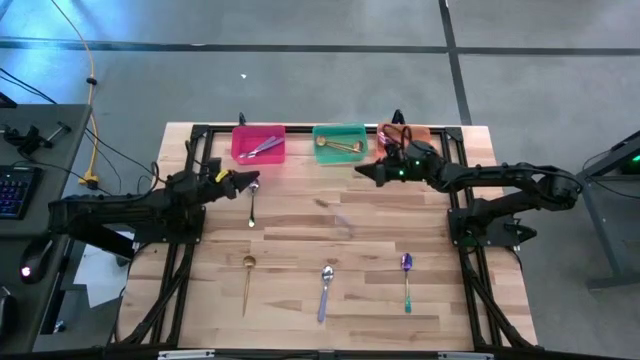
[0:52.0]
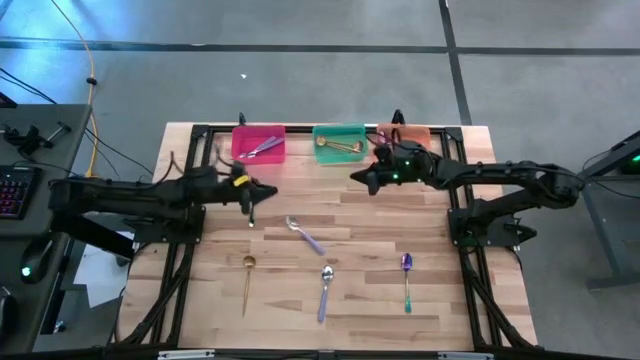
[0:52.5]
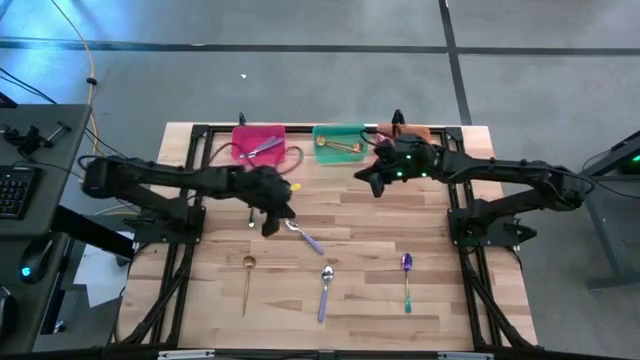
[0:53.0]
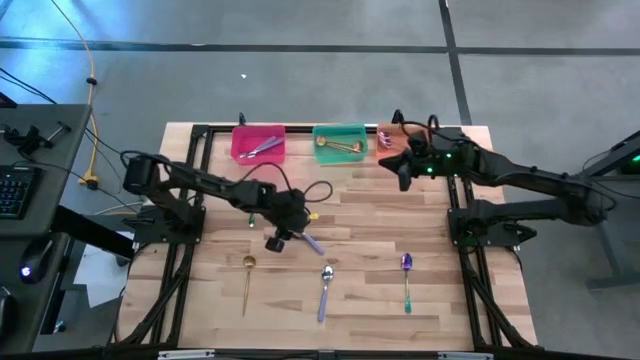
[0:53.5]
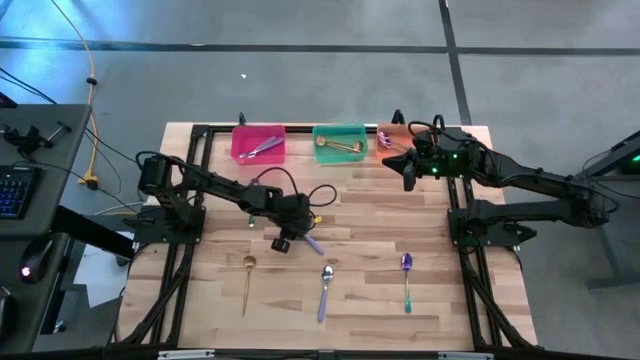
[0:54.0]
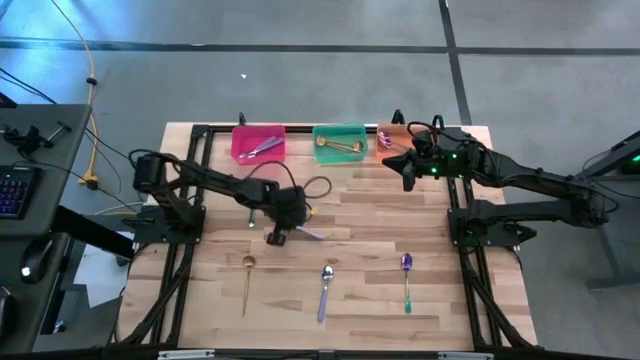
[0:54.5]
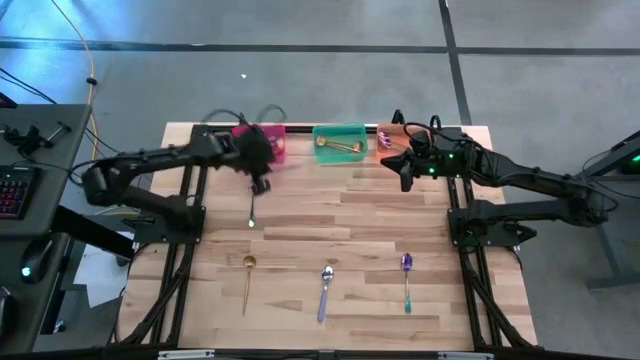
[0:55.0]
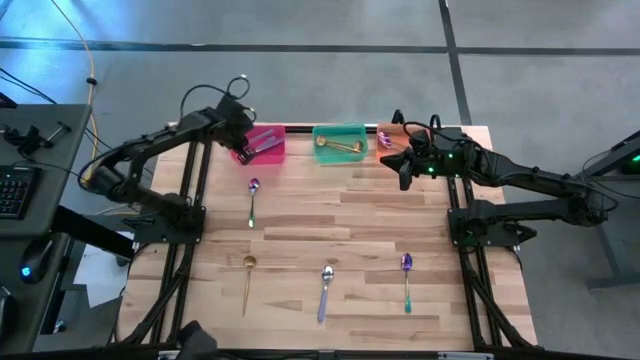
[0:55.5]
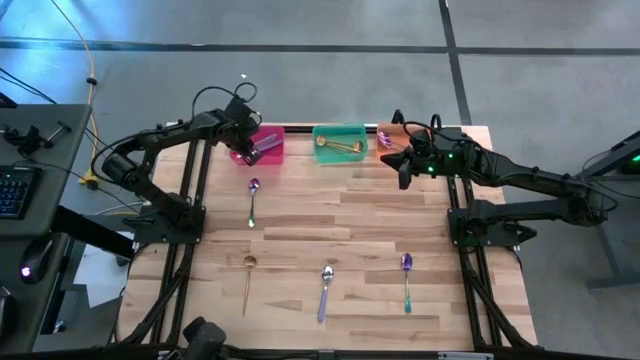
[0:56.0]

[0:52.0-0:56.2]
Task: Sort silverware by color (type)
Put the top purple spoon into the pink bin

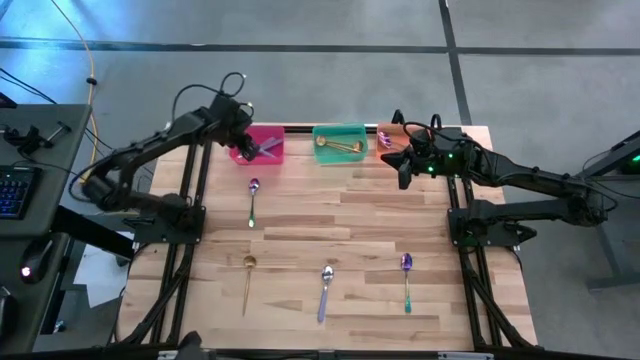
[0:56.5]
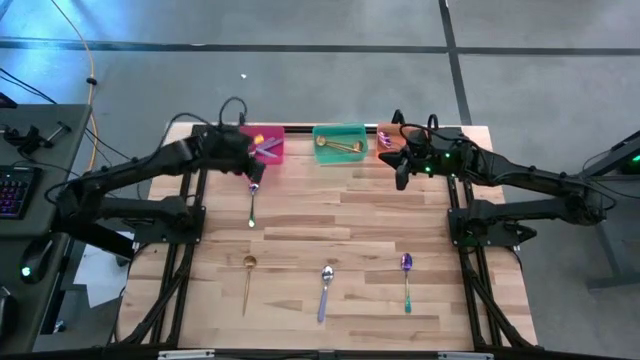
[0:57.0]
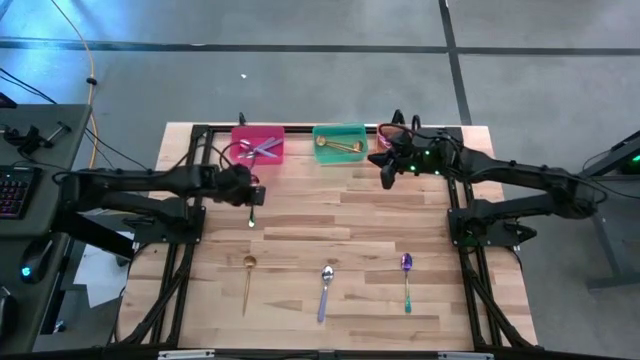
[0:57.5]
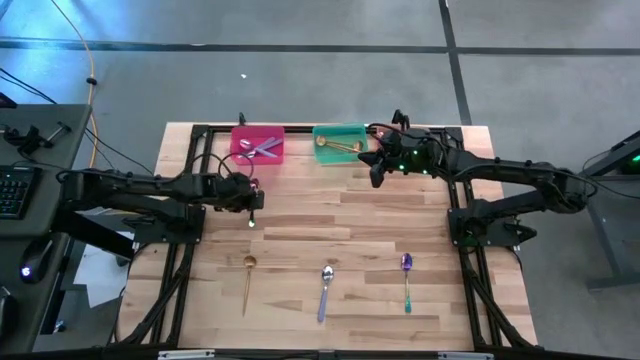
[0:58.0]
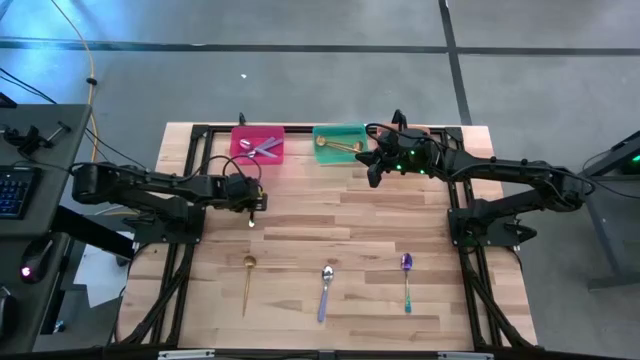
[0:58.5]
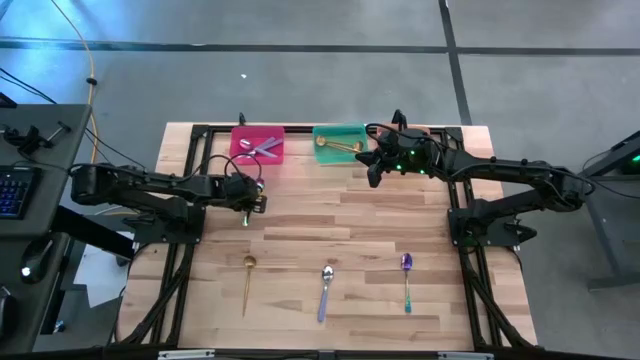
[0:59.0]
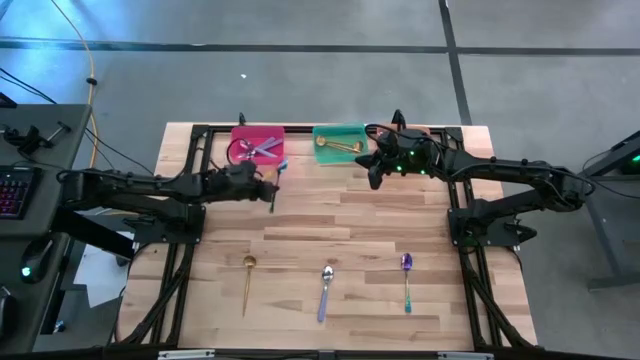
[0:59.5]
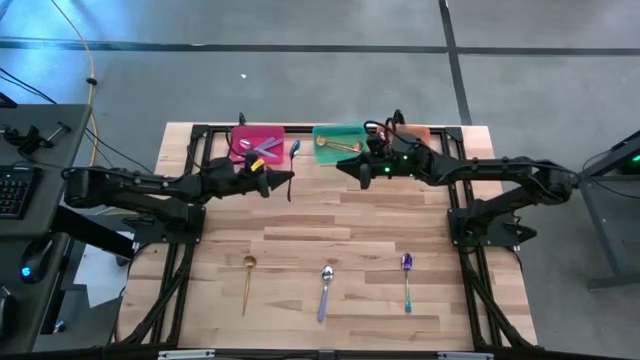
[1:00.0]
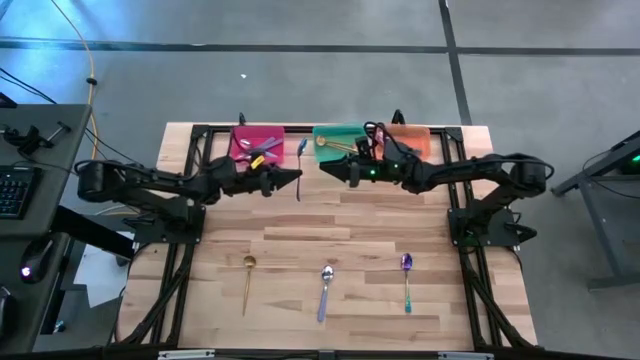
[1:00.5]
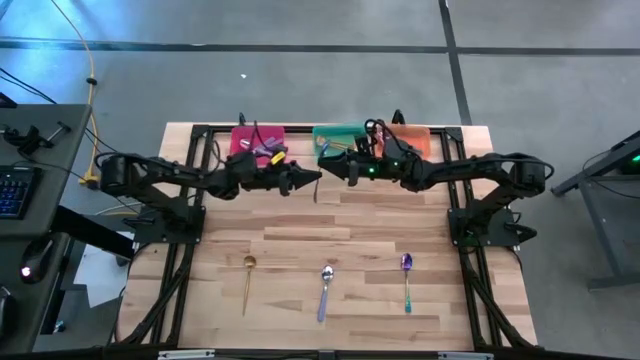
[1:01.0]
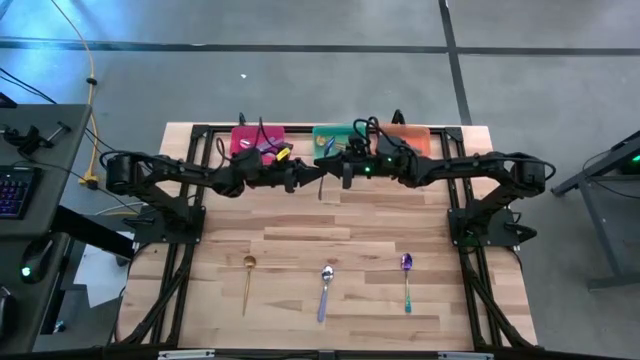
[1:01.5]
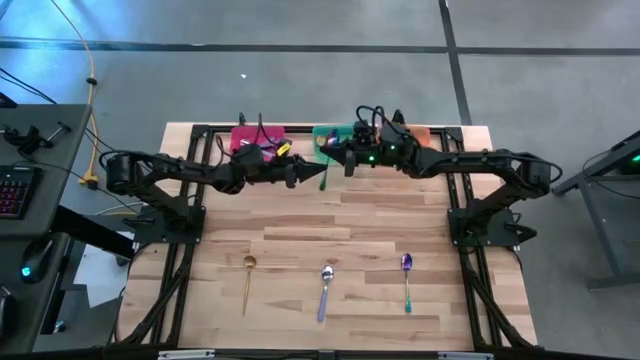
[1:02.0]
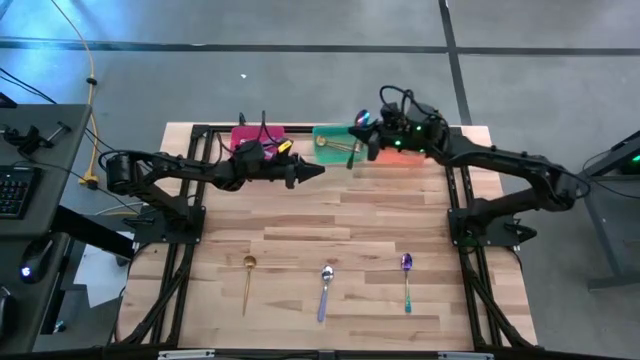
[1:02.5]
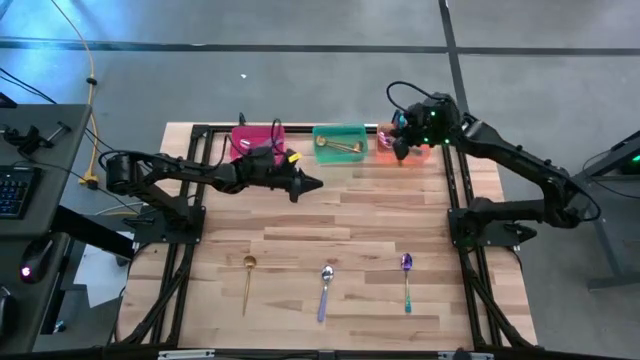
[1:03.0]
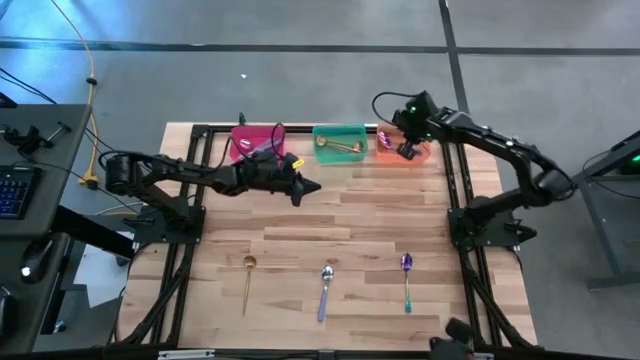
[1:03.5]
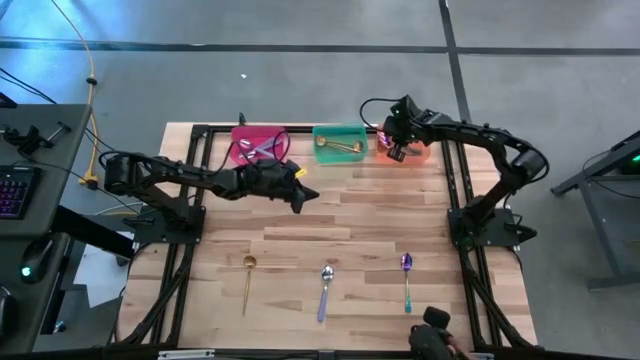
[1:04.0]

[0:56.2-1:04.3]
Put the left silver spoon into the orange bin

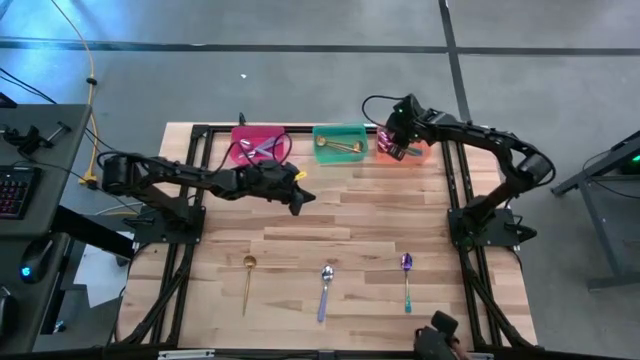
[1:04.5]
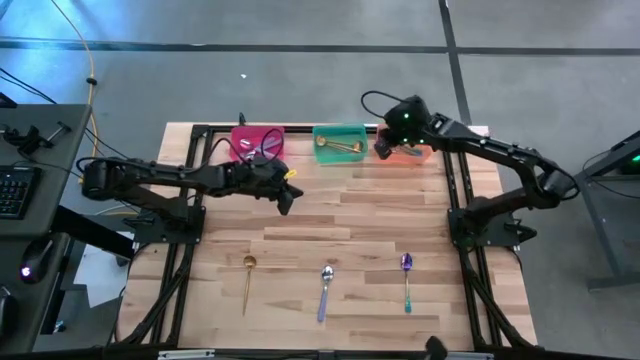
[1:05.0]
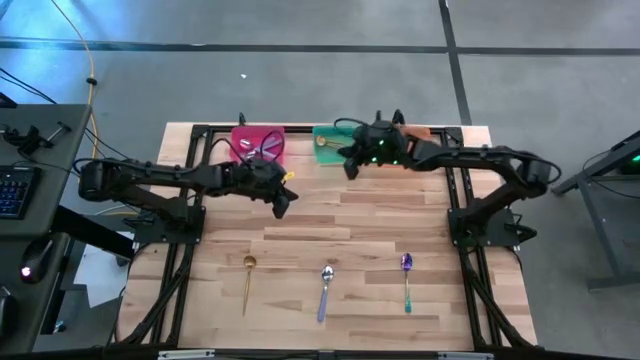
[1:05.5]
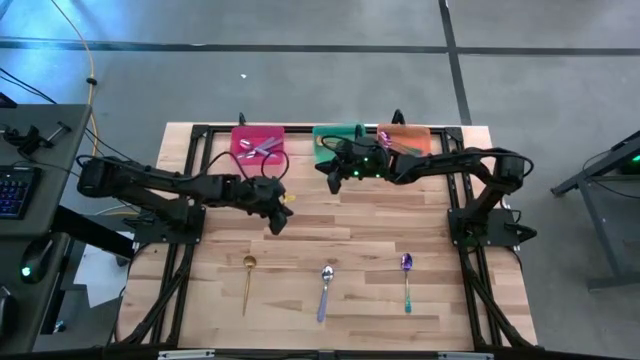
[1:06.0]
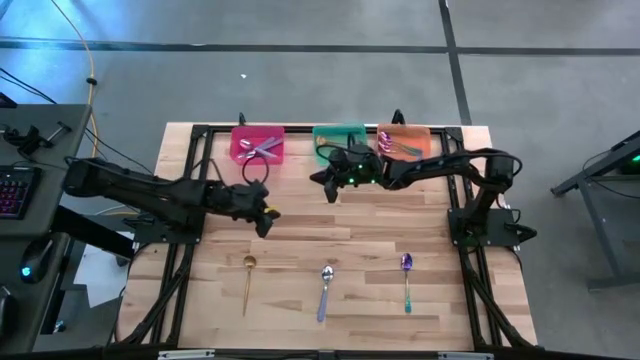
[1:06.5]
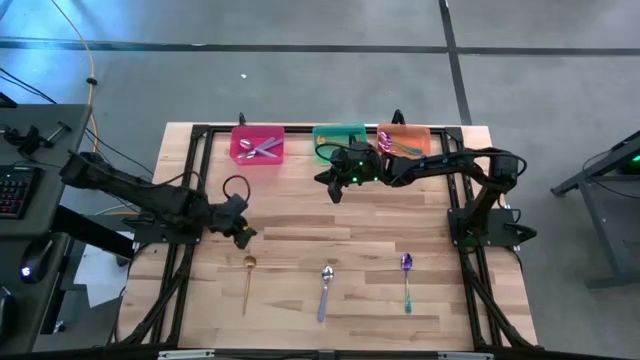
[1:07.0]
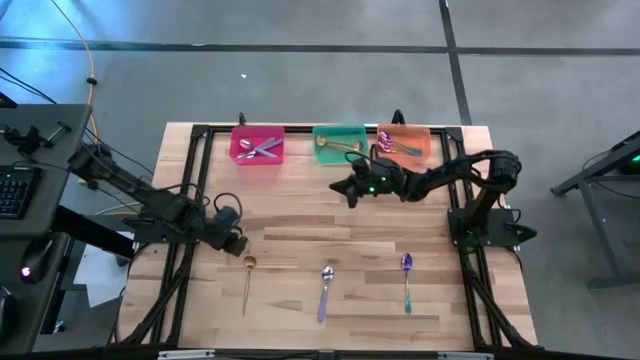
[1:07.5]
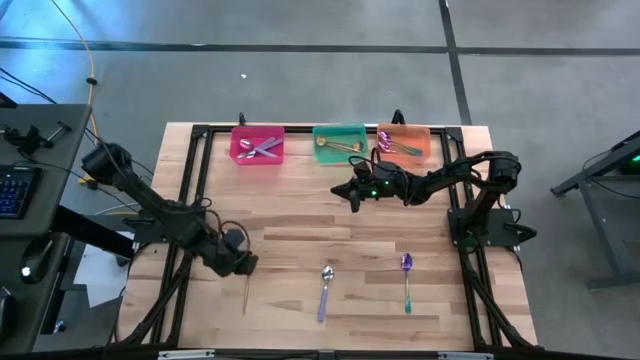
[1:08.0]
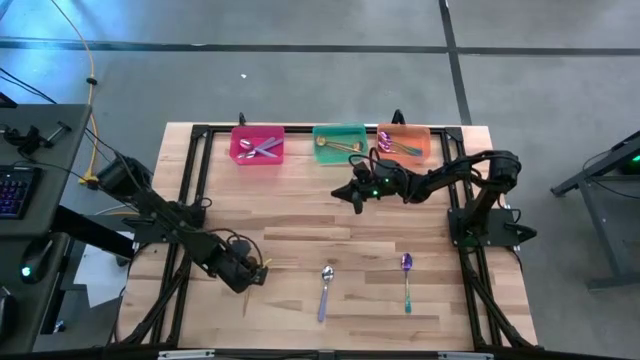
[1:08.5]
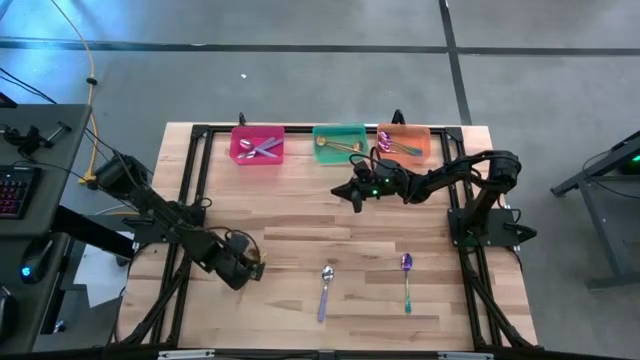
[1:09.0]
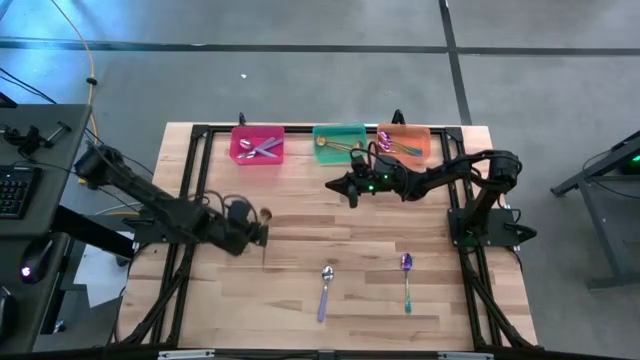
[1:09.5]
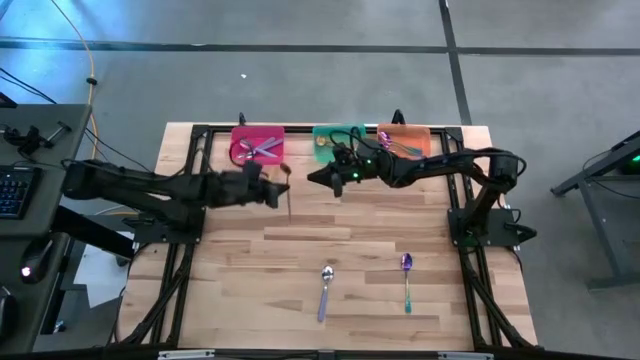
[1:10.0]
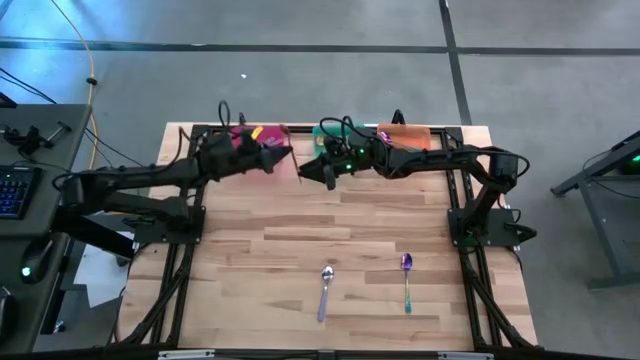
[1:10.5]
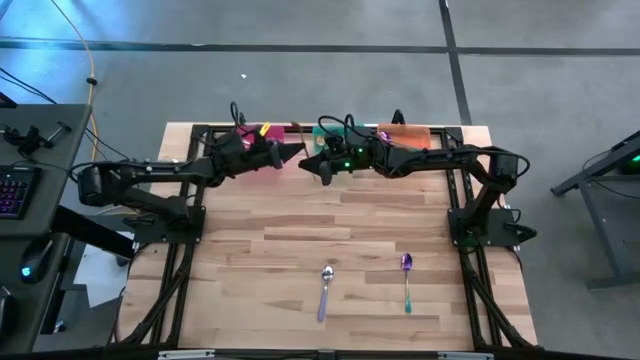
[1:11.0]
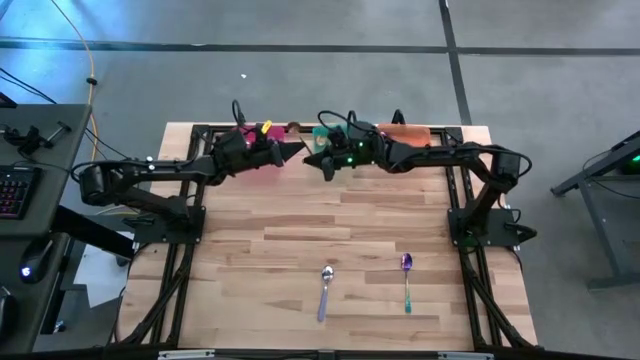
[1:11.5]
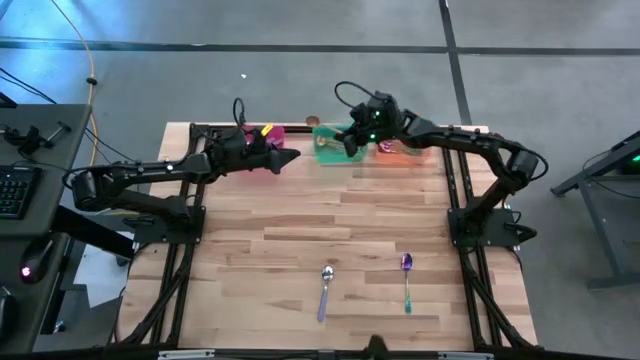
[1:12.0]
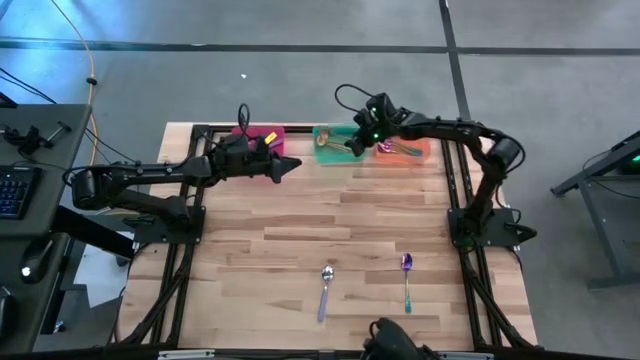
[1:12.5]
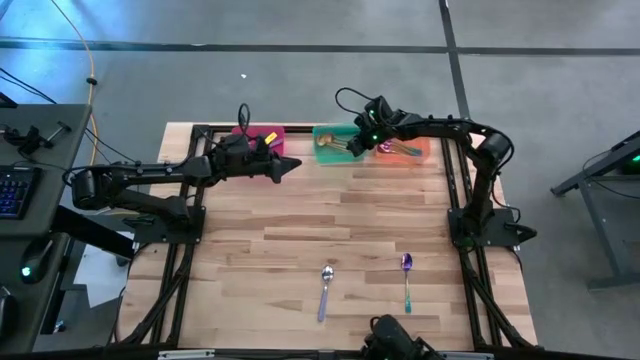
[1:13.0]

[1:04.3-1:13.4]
Put the gold spoon into the green bin
